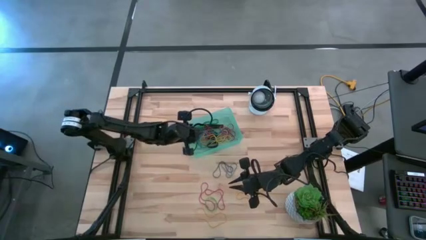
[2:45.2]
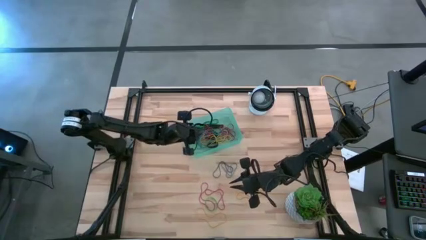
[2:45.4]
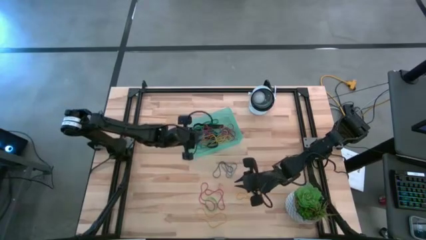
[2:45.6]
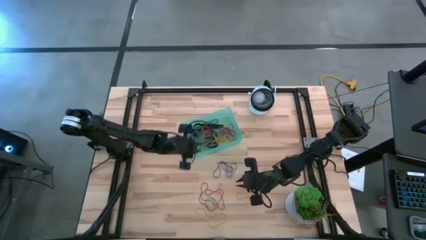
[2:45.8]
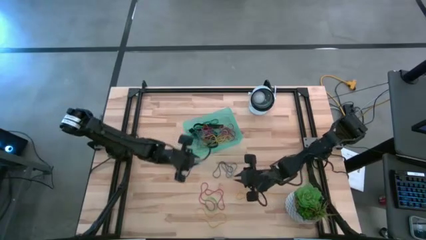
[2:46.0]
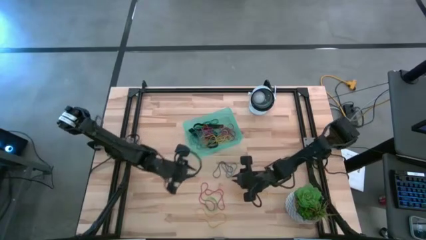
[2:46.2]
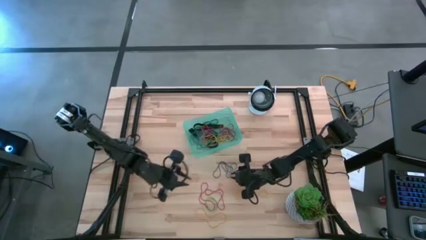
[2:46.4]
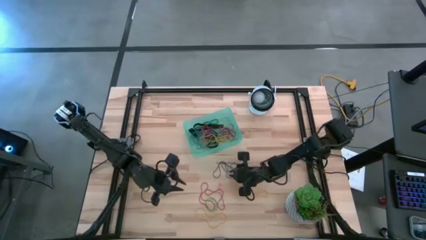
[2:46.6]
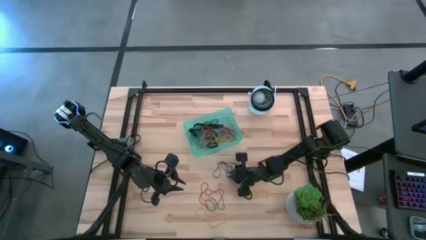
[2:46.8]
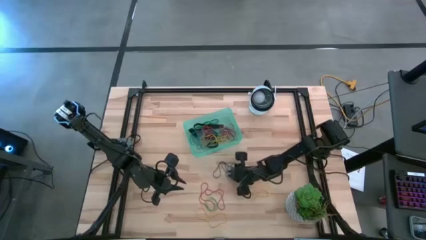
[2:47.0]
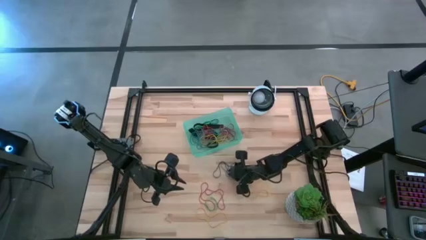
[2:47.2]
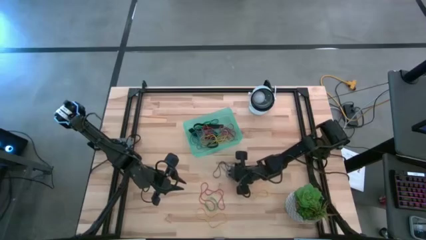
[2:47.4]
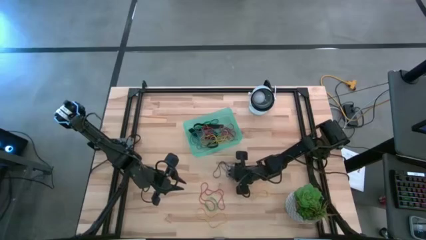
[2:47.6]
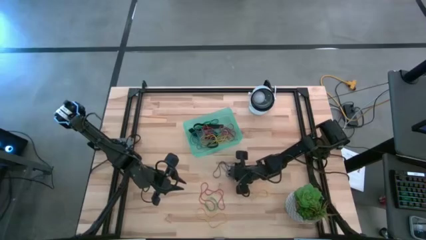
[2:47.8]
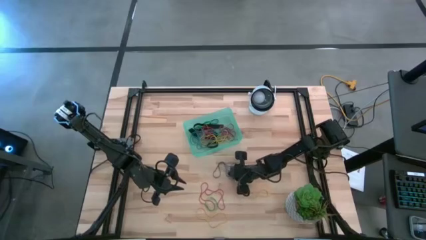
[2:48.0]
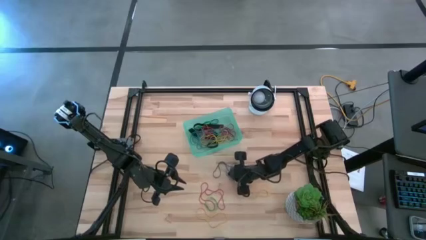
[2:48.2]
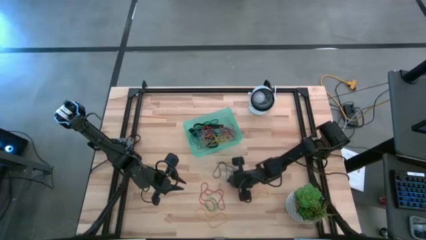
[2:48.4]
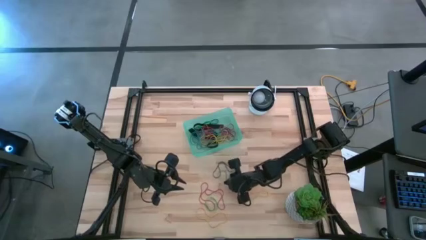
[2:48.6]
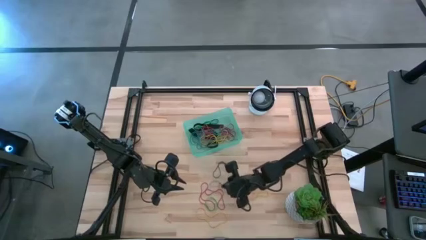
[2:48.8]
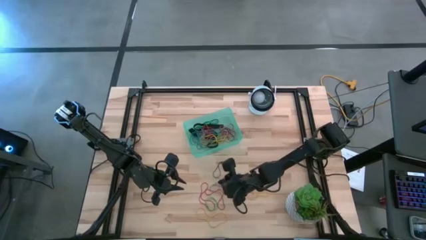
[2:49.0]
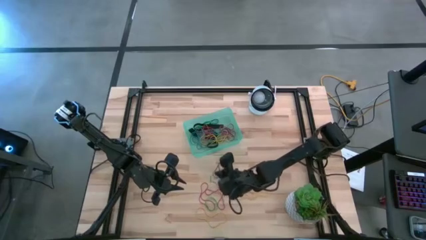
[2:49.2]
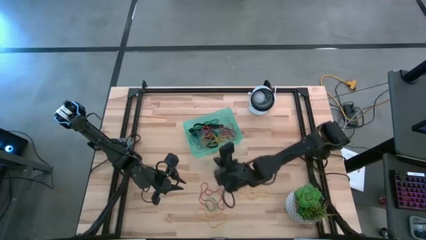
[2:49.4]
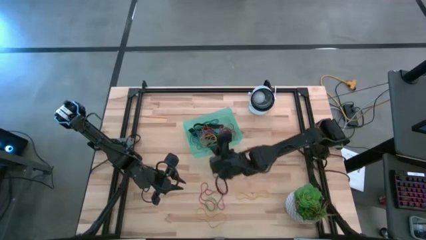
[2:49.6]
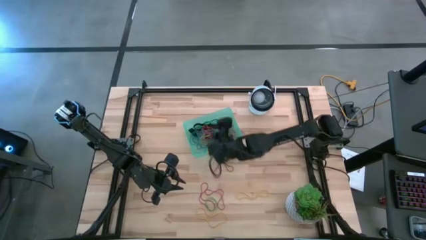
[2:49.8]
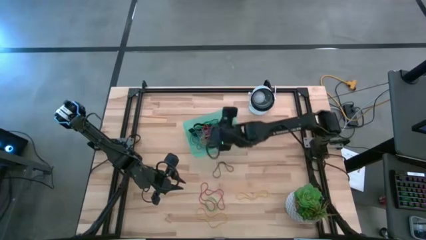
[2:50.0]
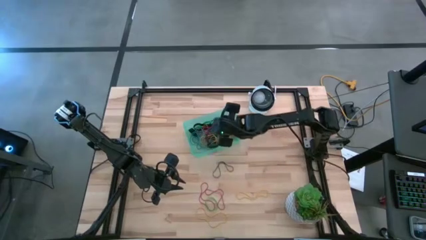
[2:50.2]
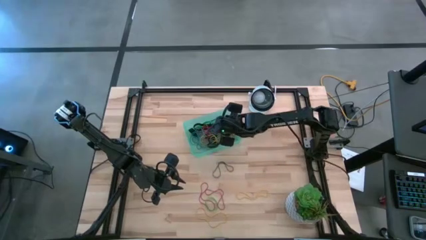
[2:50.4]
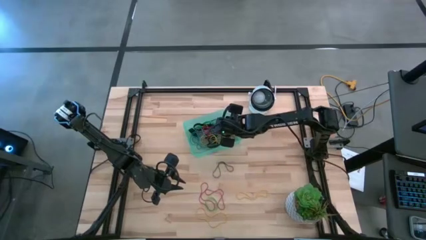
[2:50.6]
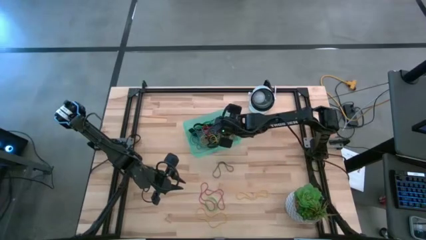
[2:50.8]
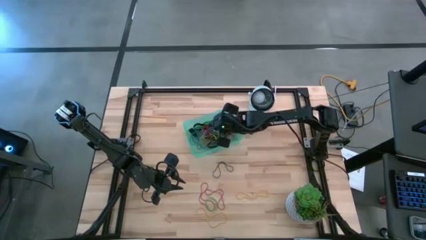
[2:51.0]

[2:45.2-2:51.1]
Task: Pick and place rubber bands into bin
Put the blue rubber band into the green bin

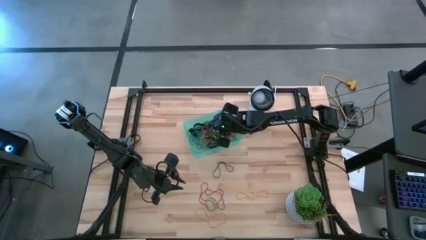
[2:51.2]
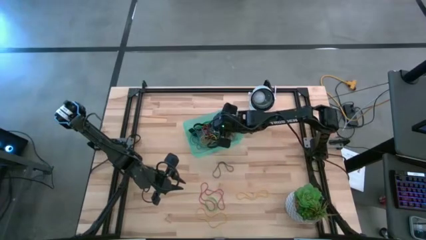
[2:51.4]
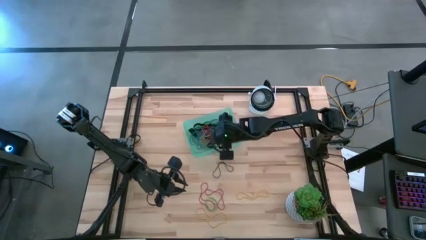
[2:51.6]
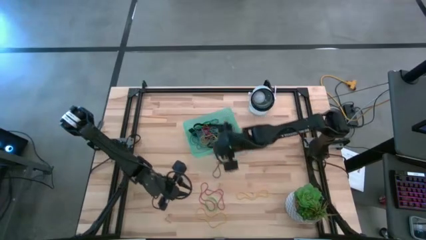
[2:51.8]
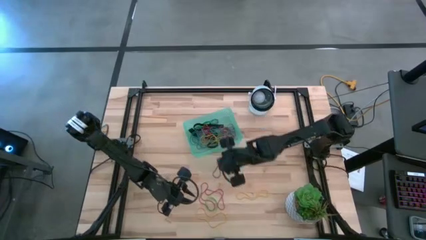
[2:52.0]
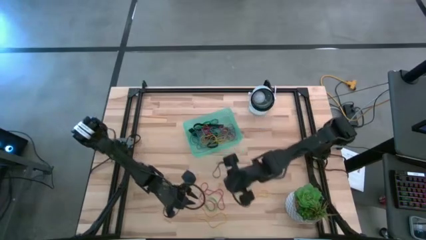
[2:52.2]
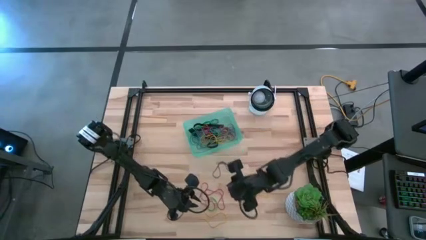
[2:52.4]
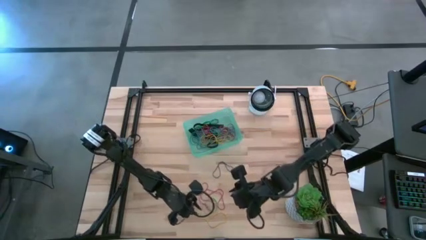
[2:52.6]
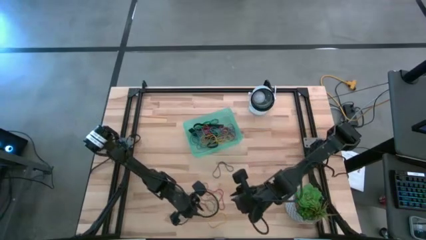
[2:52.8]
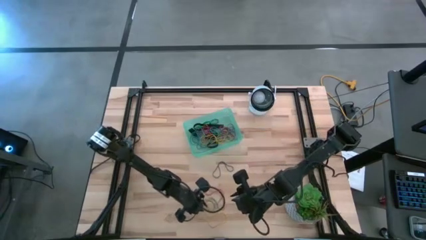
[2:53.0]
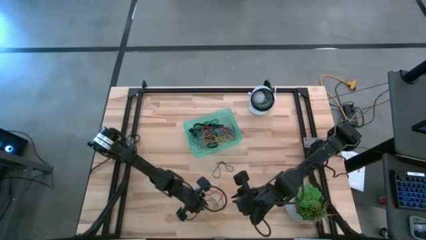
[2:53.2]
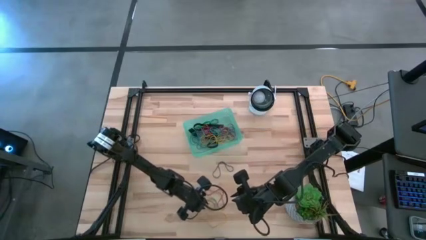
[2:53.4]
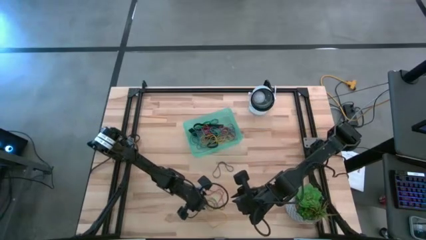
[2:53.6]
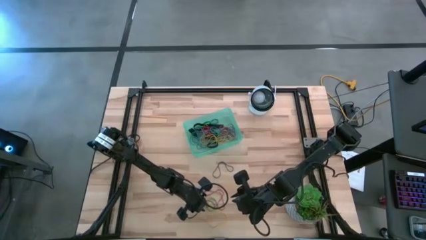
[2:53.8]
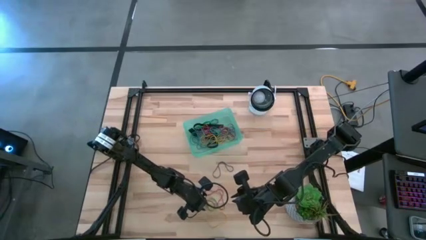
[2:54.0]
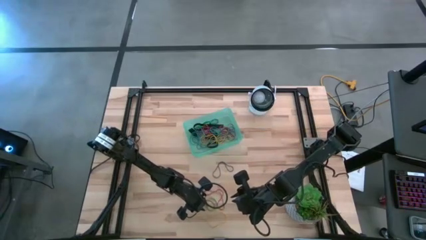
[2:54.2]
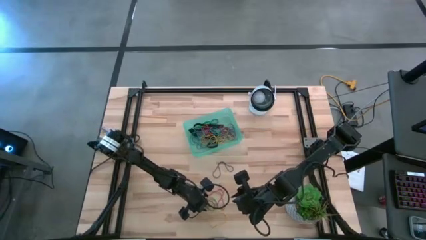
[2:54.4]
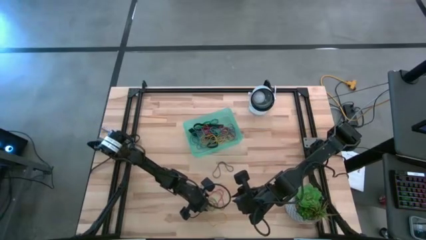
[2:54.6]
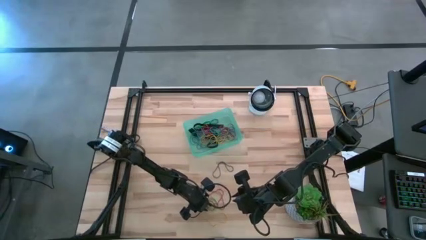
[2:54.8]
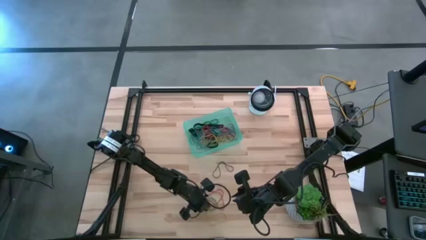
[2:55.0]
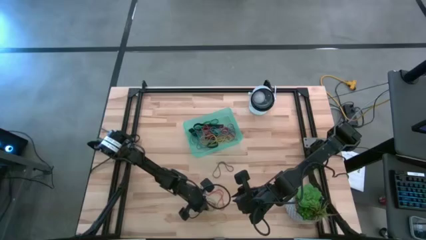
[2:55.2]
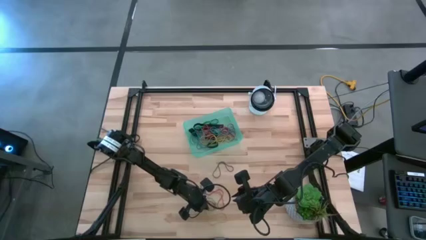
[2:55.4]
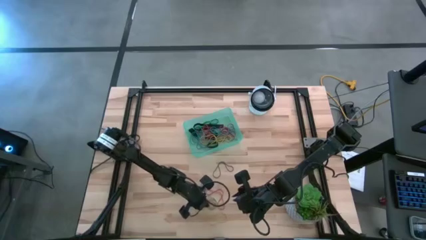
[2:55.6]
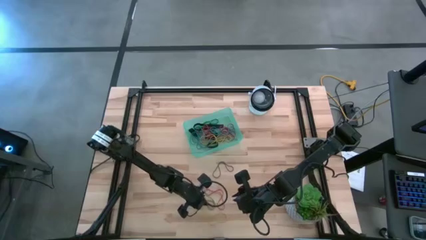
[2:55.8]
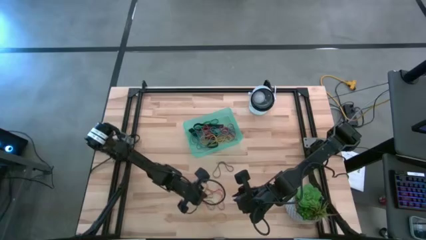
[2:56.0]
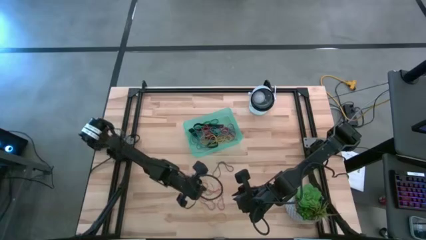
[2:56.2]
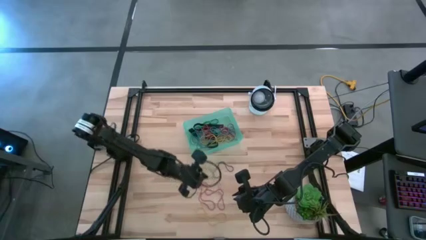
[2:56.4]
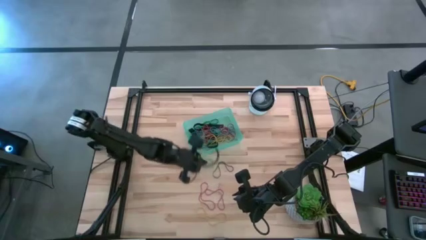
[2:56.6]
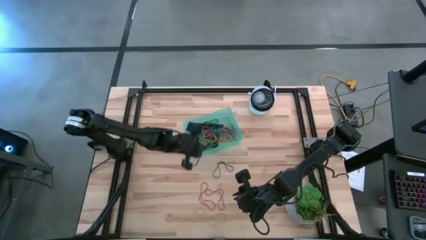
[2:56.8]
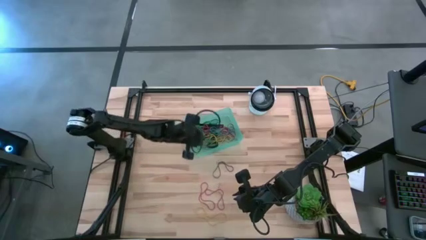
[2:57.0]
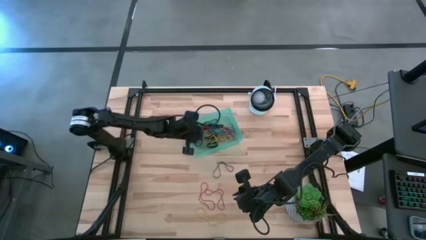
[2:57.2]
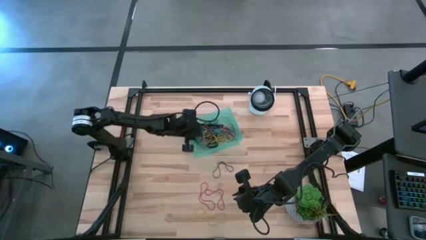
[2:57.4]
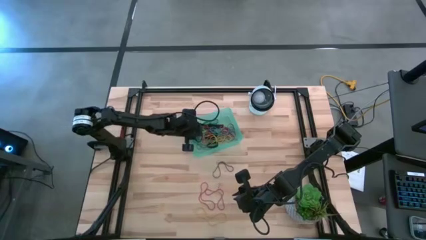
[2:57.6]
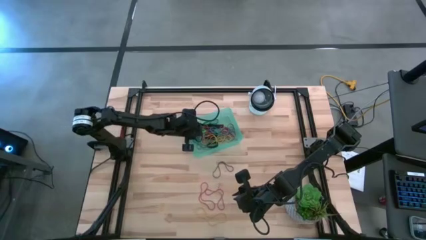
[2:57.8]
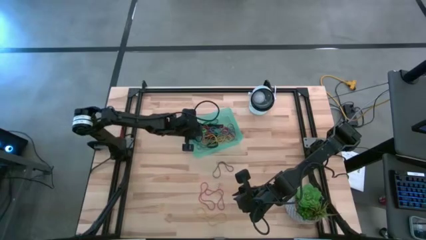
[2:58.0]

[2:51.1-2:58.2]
Put the green rubber band into the green bin

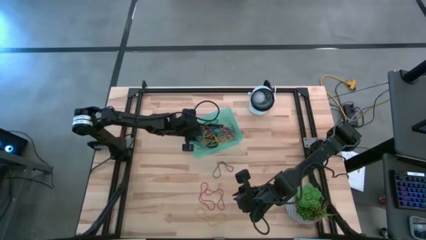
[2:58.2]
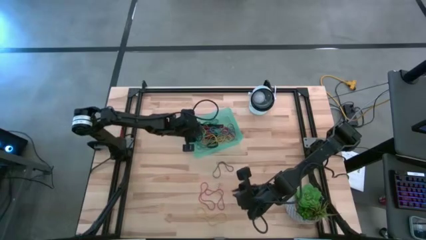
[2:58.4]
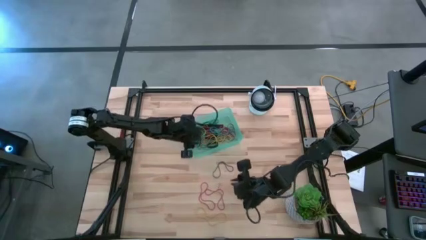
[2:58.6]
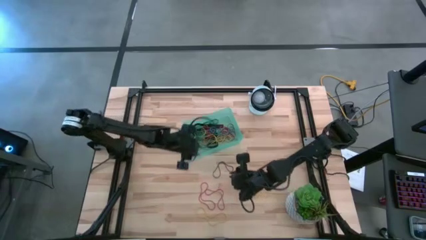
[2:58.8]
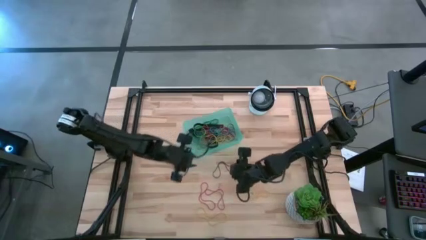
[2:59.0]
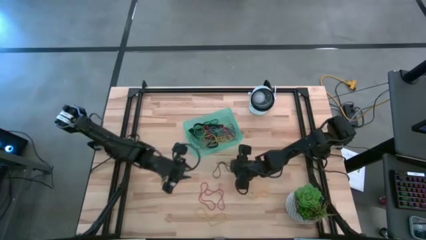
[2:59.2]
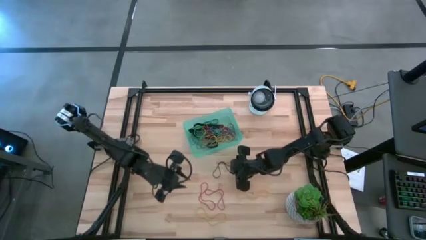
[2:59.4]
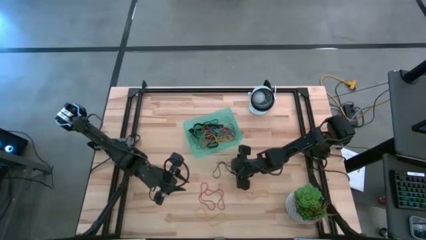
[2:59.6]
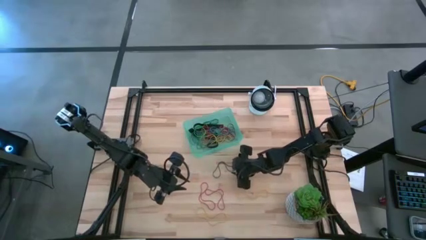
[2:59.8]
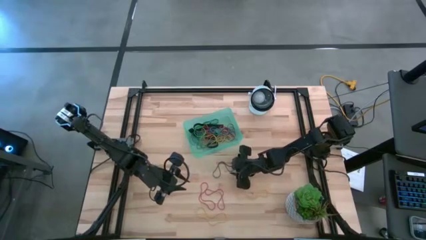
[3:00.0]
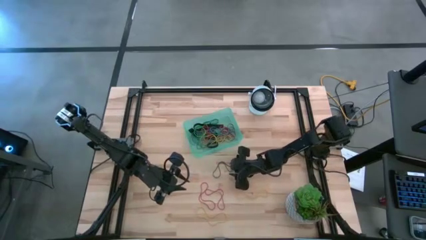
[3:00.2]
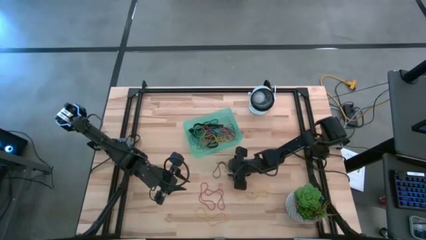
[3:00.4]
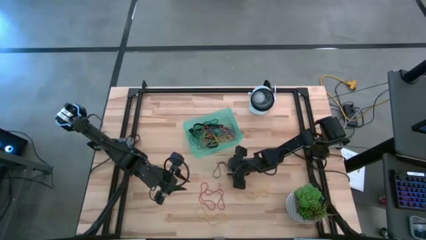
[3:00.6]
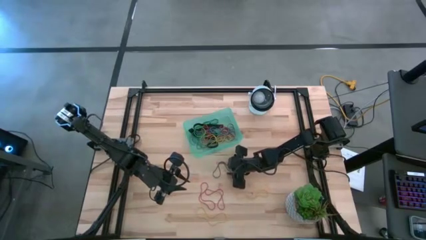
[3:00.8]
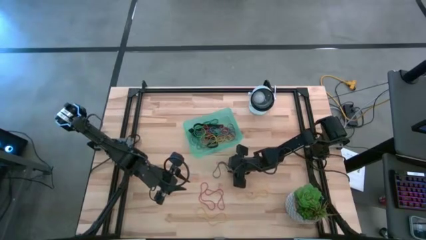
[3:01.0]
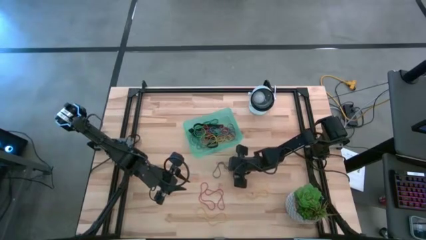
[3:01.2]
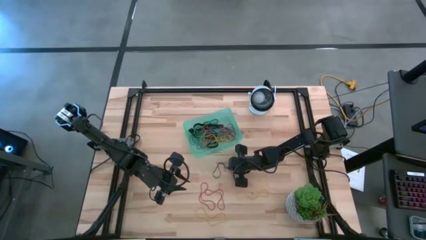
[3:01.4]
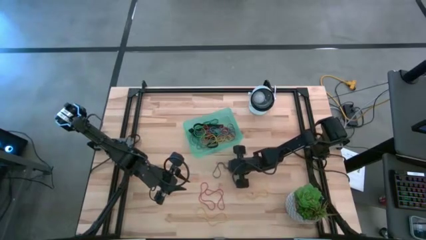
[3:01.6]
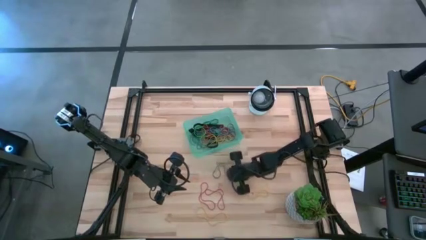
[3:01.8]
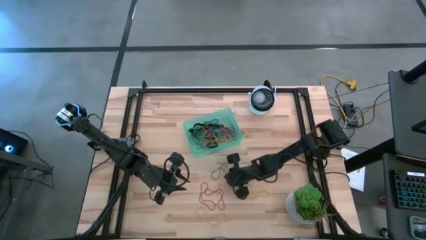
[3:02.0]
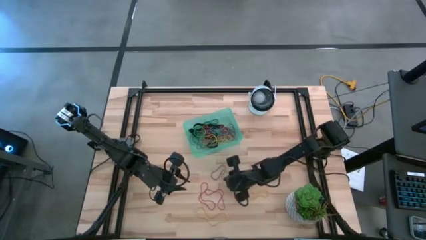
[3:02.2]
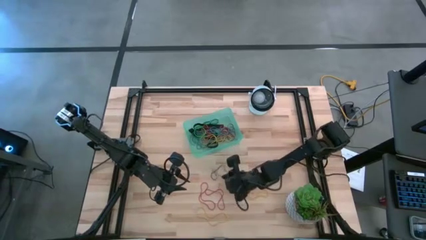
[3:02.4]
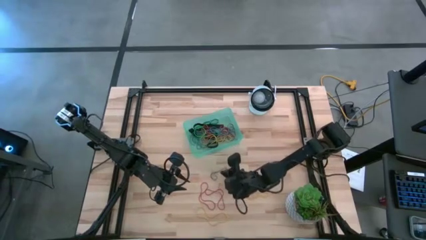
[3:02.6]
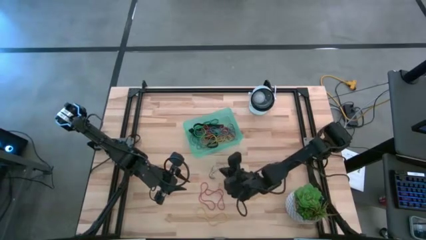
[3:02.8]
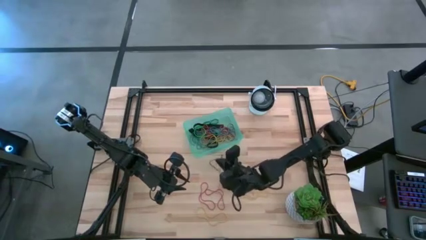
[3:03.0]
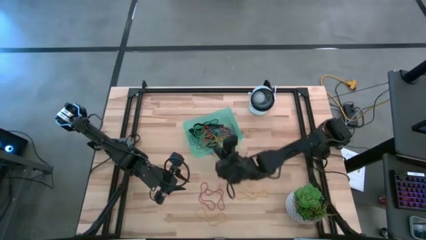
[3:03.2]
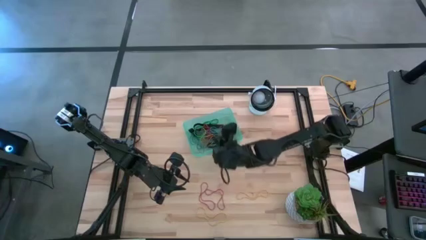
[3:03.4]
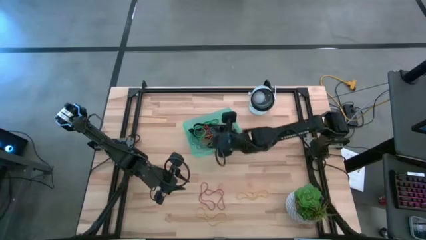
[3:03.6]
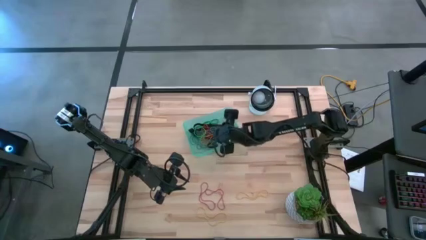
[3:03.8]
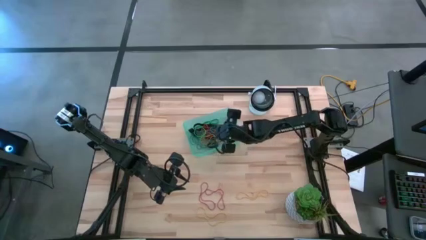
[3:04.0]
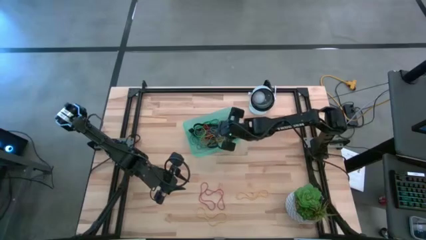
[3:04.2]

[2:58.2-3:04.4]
Put the violet rubber band into the green bin
